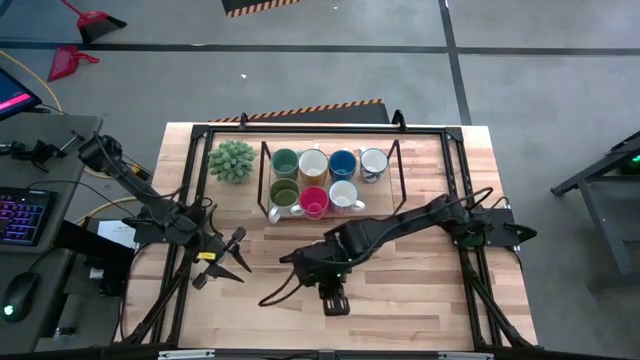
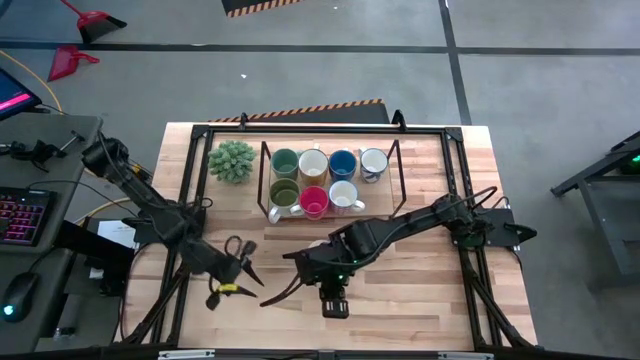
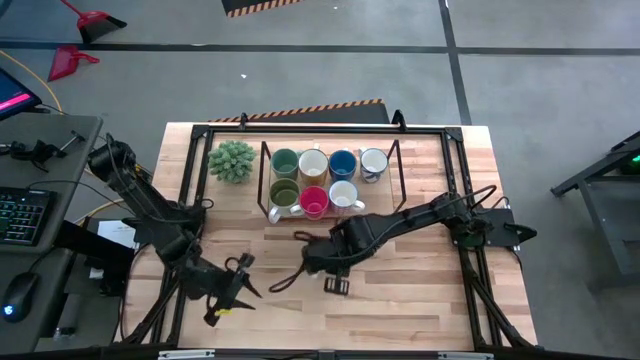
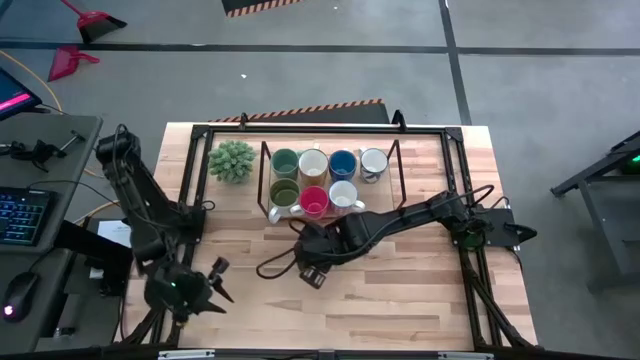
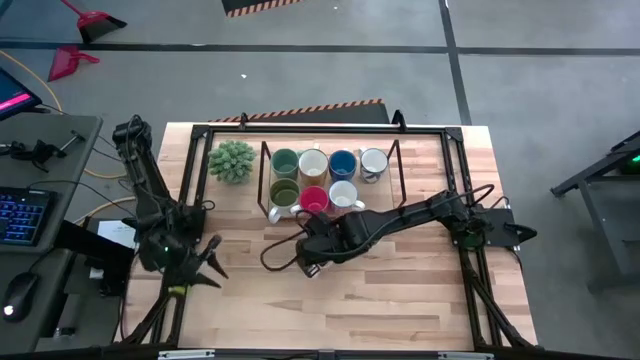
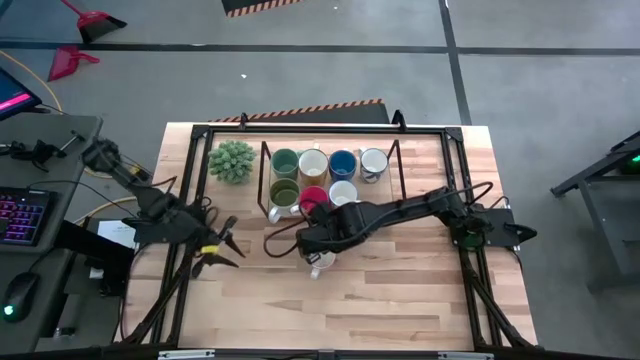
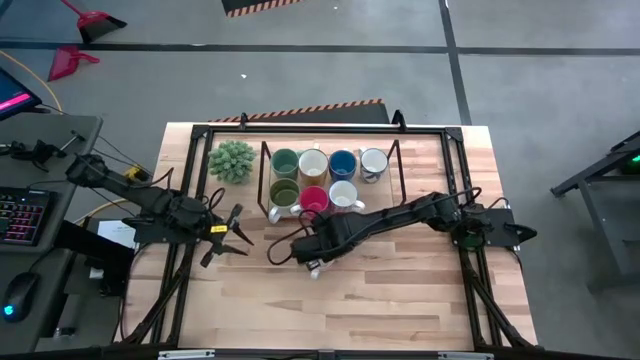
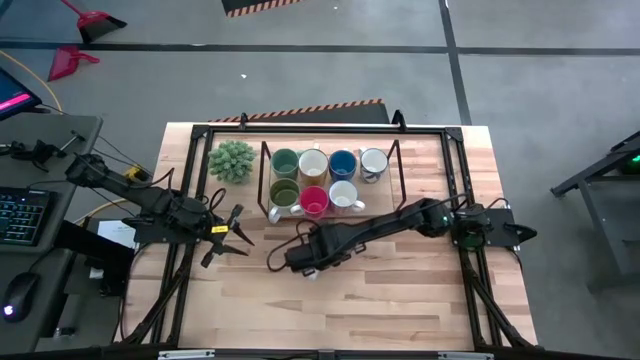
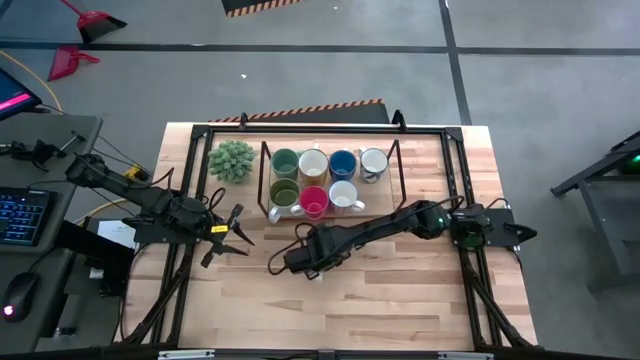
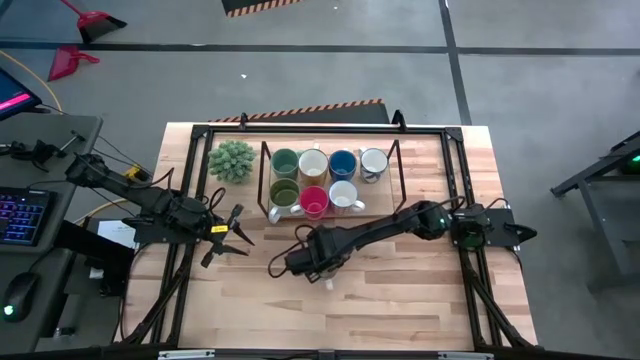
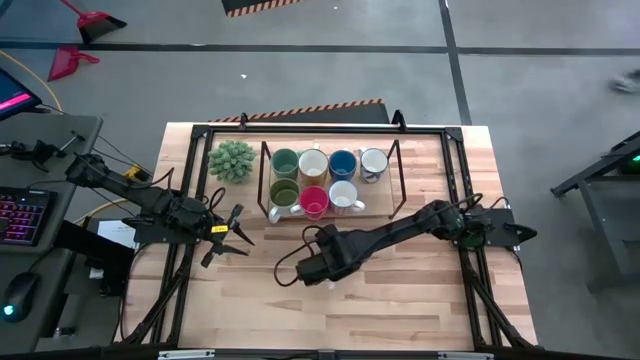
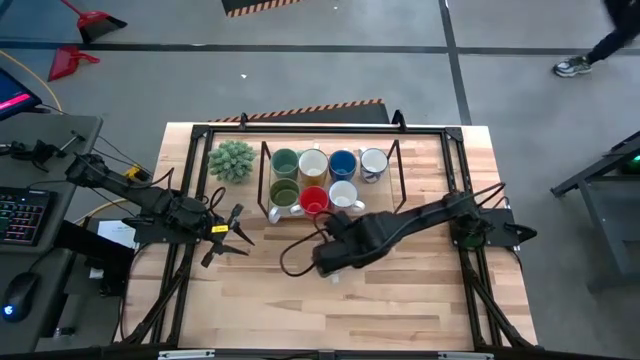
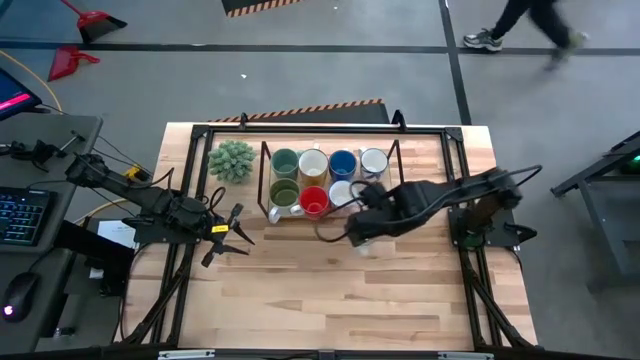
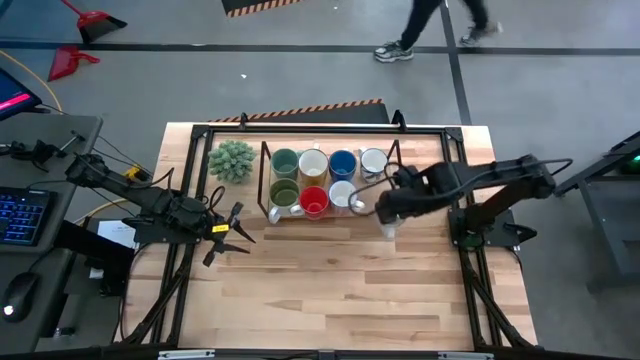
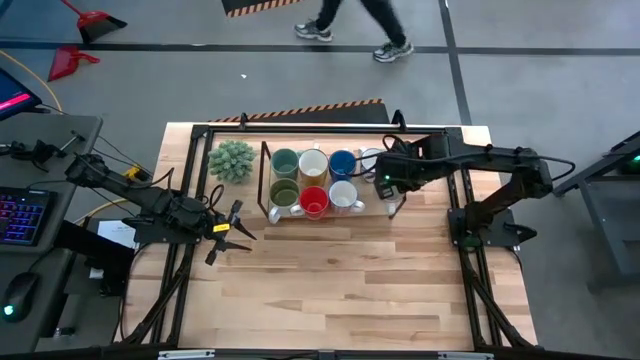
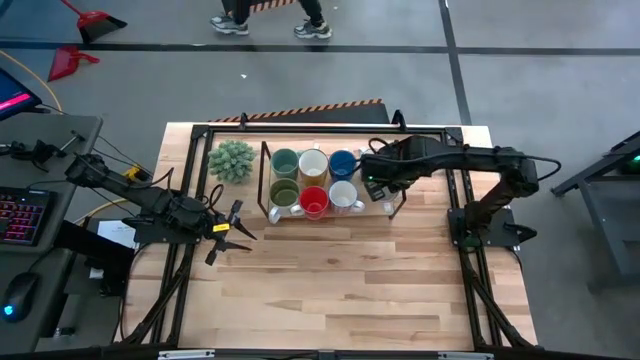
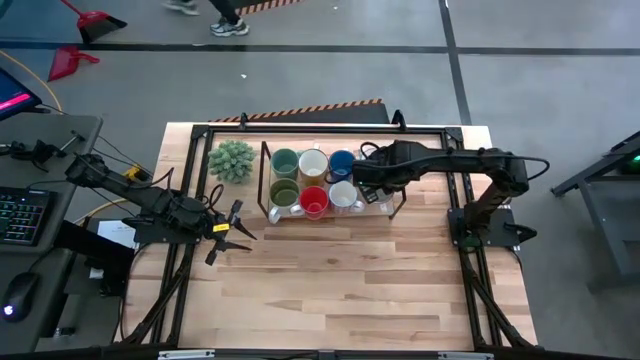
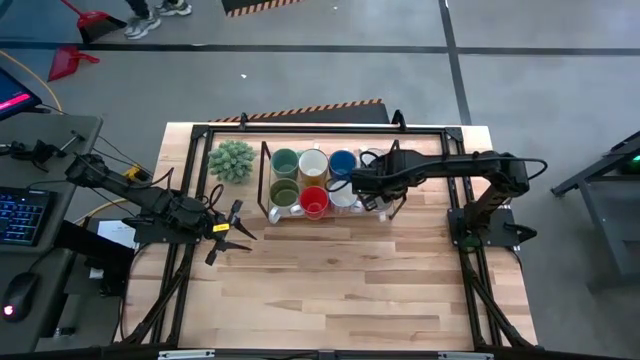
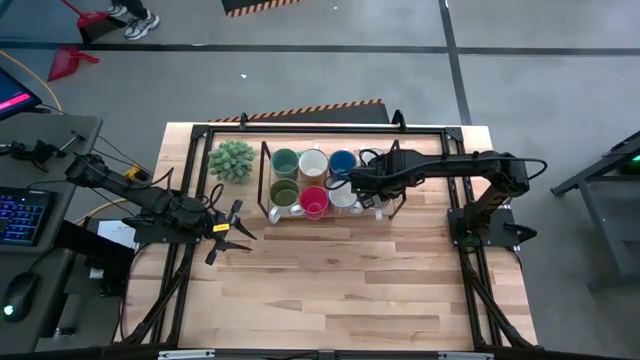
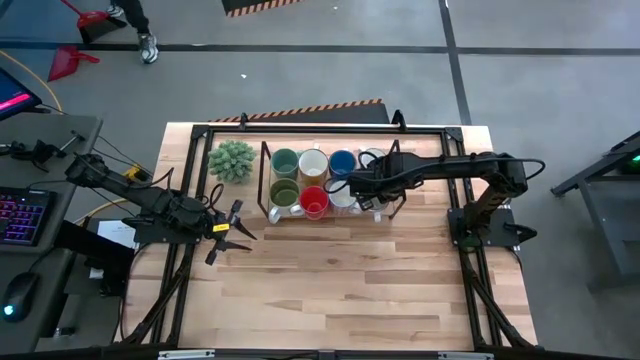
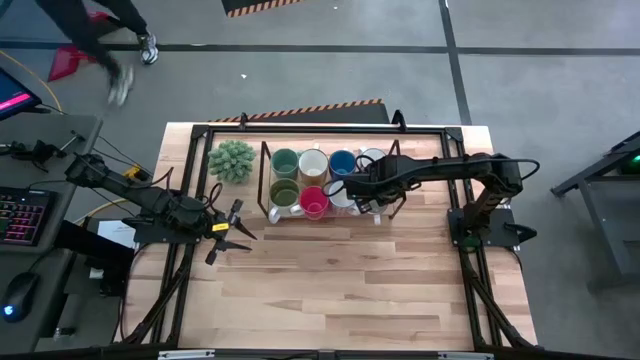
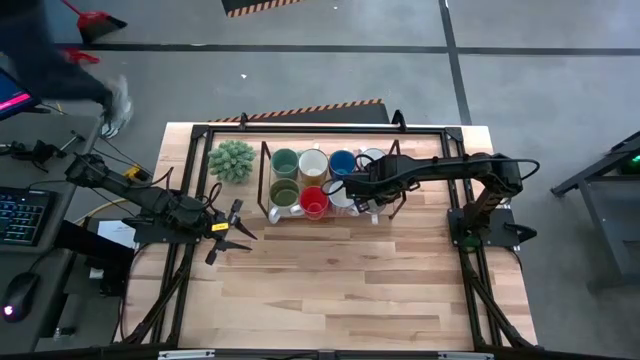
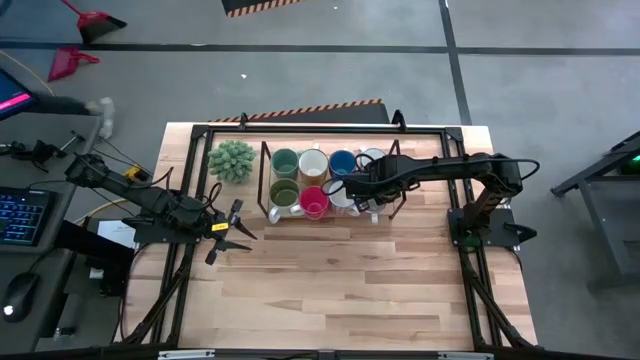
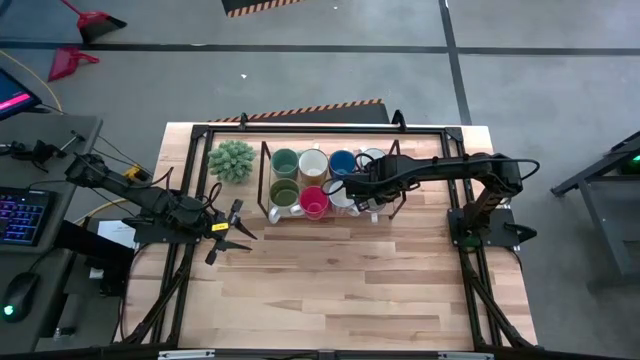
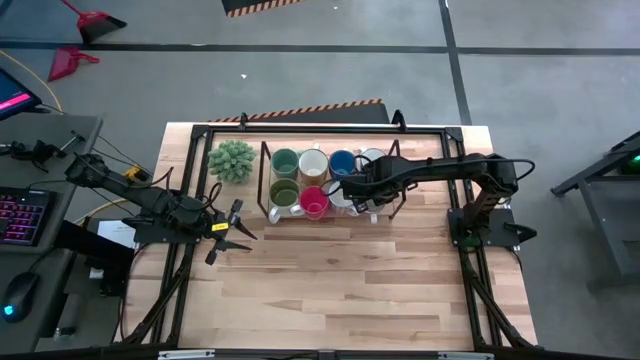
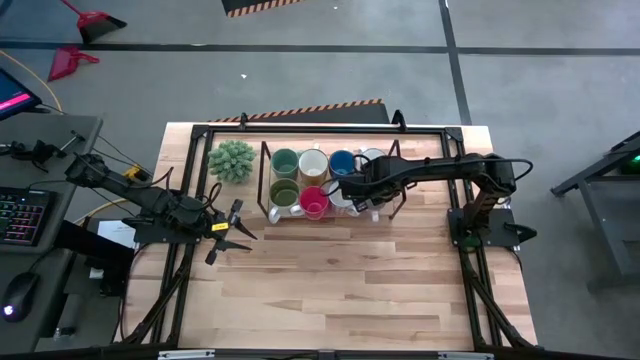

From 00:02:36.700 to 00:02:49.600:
Task: Place coffee mugs
Put the gray patterned mug on the shelf
